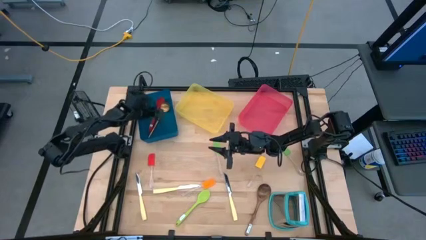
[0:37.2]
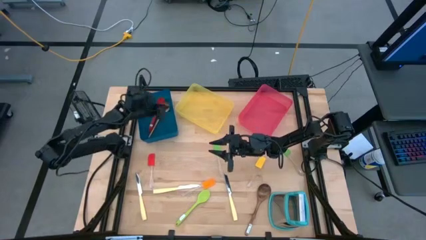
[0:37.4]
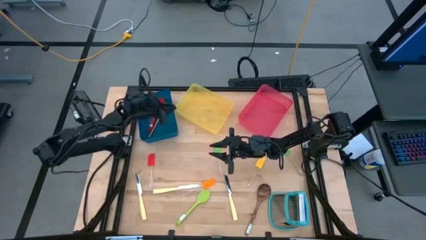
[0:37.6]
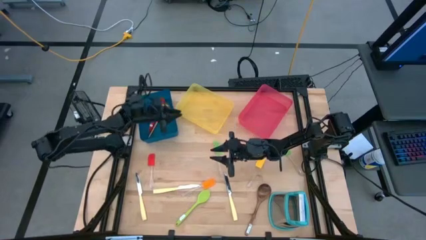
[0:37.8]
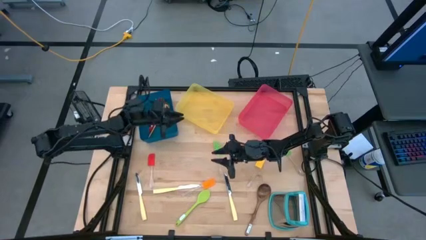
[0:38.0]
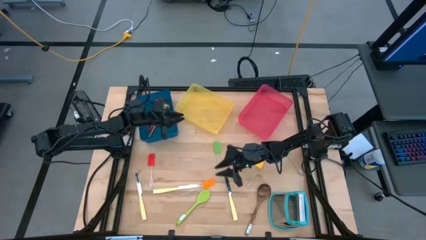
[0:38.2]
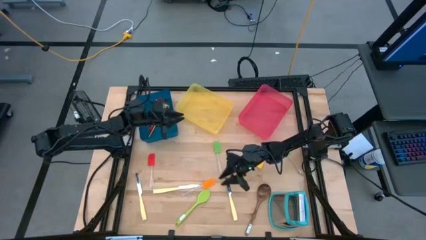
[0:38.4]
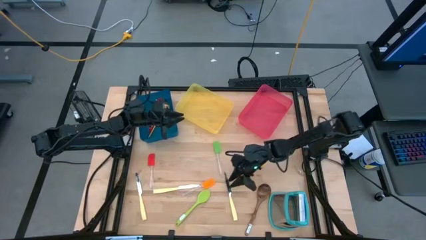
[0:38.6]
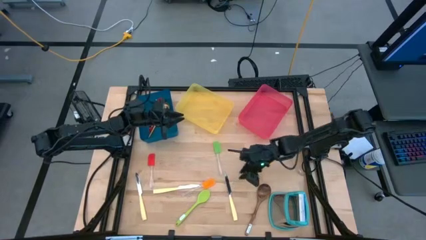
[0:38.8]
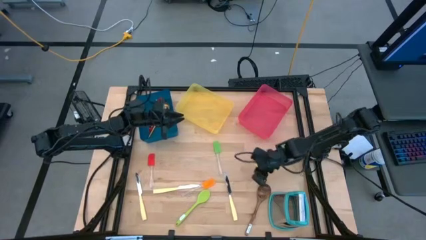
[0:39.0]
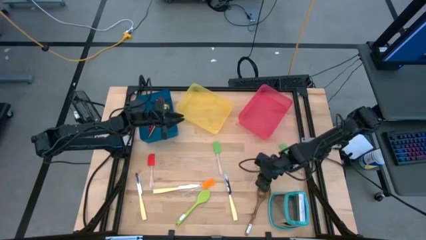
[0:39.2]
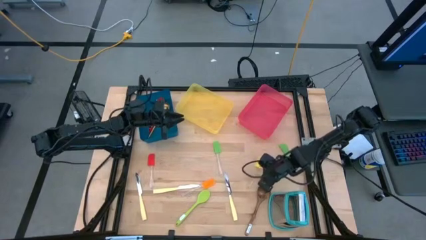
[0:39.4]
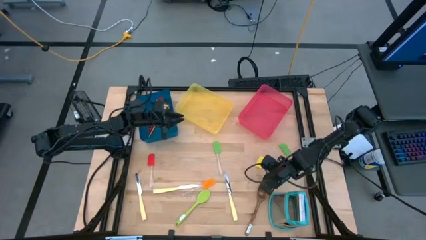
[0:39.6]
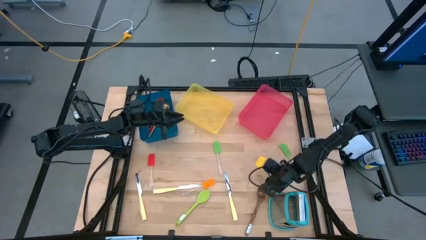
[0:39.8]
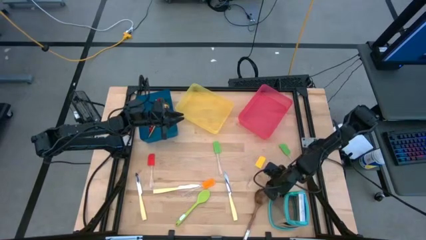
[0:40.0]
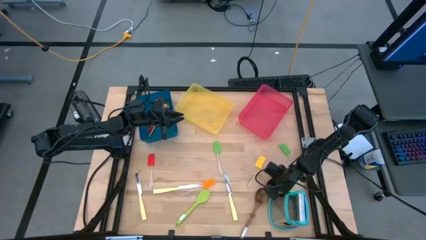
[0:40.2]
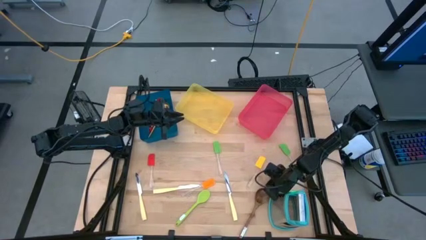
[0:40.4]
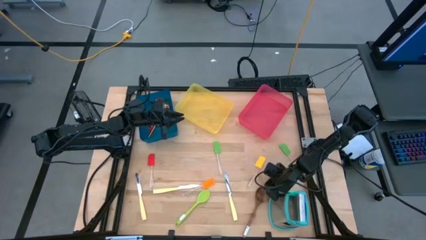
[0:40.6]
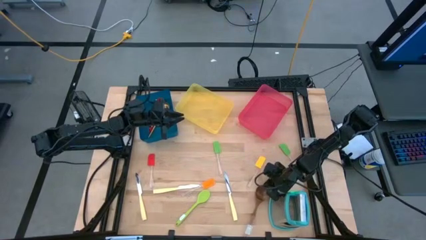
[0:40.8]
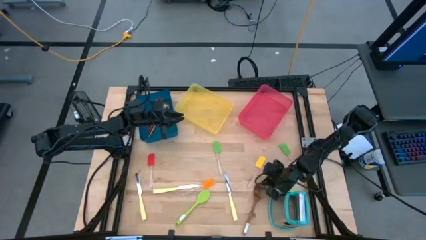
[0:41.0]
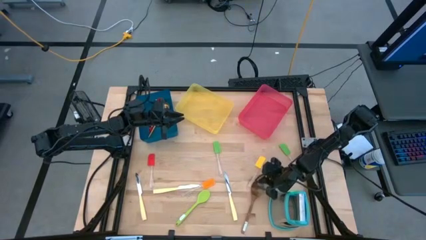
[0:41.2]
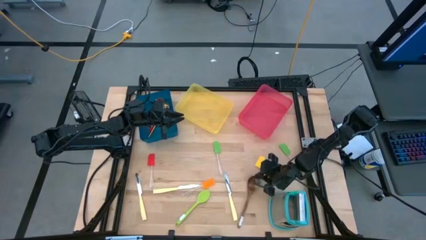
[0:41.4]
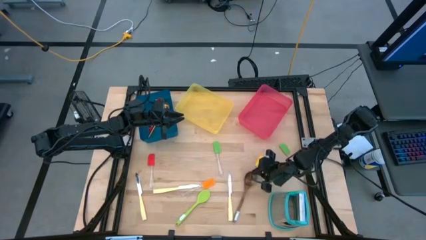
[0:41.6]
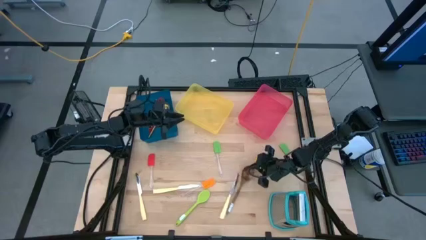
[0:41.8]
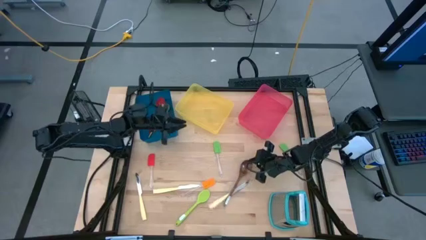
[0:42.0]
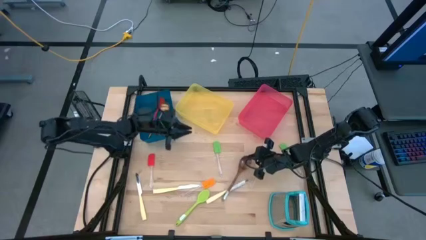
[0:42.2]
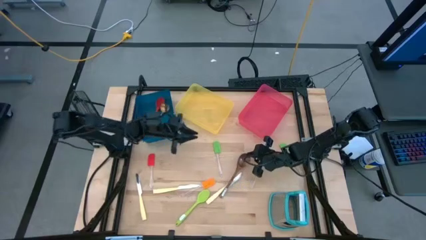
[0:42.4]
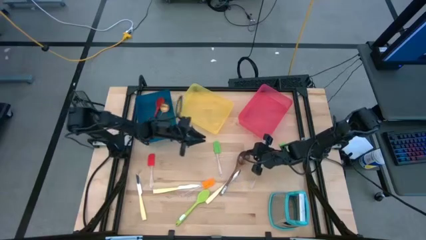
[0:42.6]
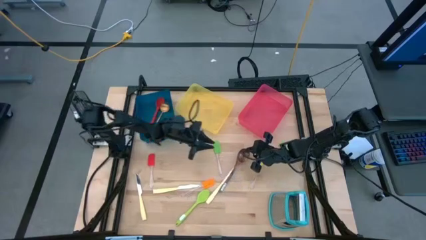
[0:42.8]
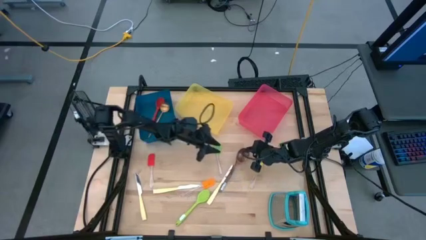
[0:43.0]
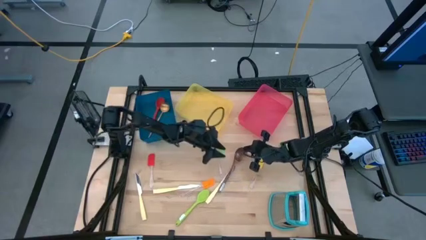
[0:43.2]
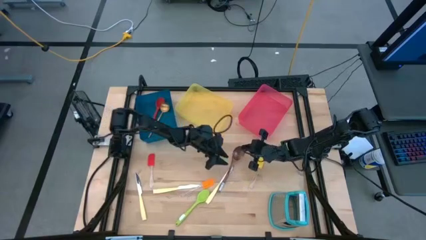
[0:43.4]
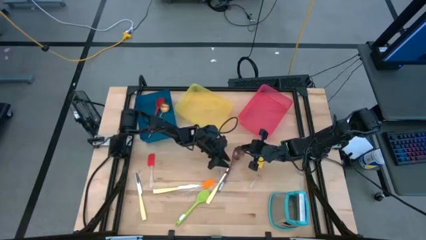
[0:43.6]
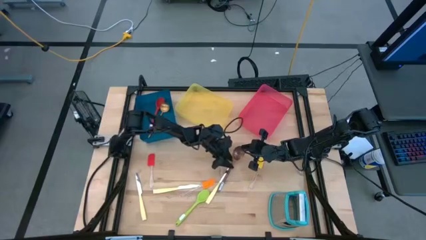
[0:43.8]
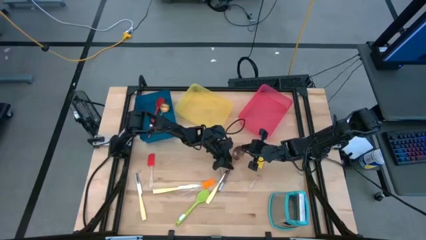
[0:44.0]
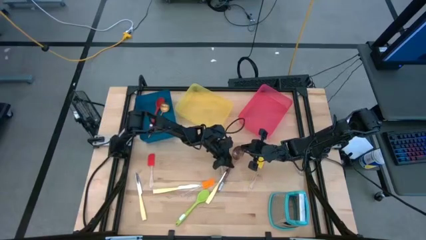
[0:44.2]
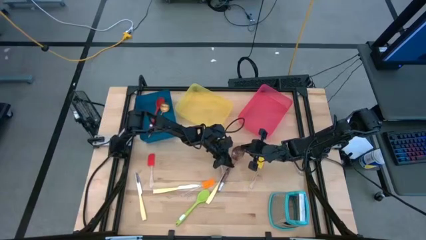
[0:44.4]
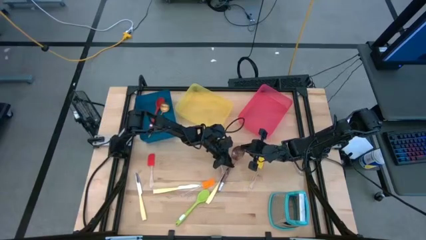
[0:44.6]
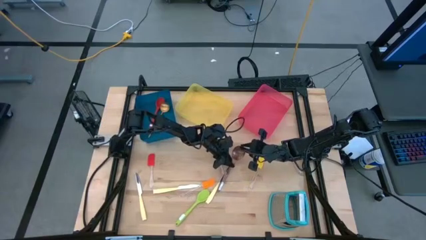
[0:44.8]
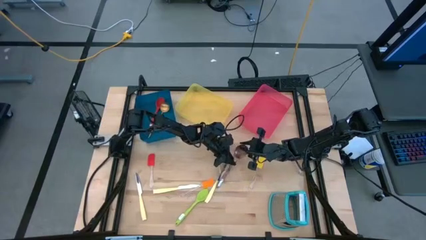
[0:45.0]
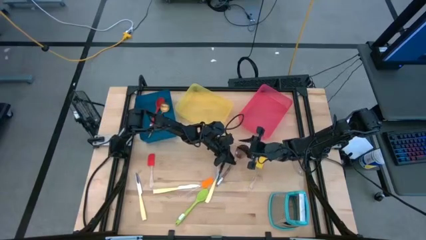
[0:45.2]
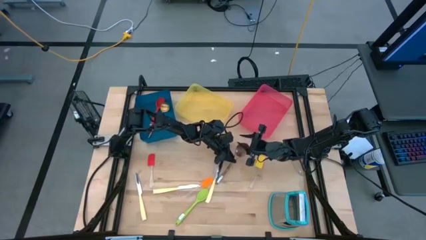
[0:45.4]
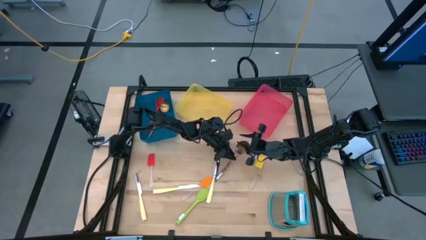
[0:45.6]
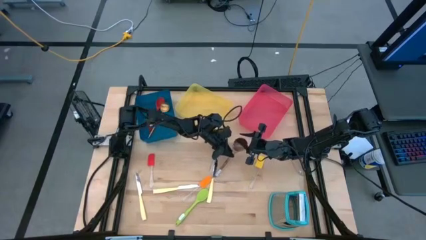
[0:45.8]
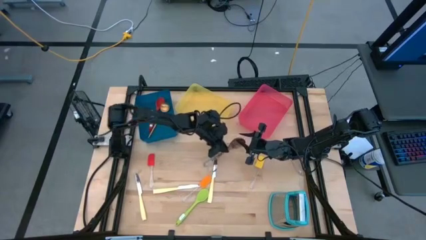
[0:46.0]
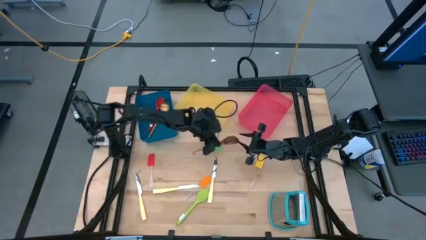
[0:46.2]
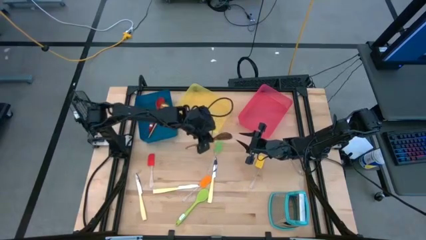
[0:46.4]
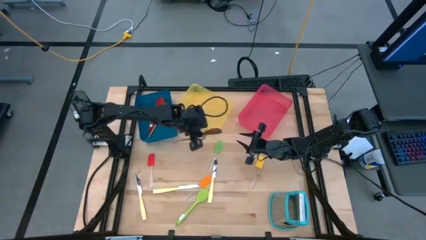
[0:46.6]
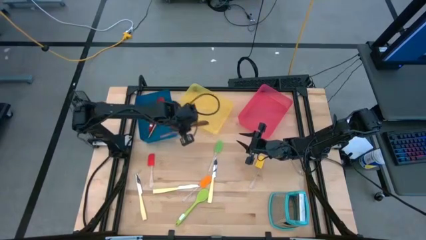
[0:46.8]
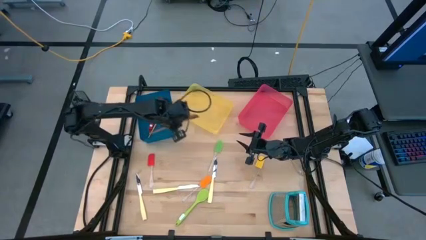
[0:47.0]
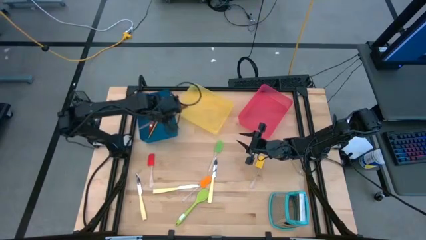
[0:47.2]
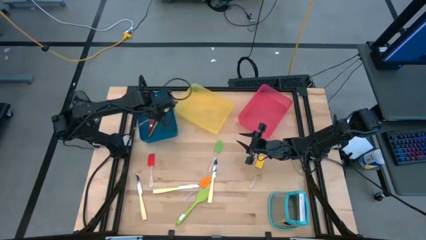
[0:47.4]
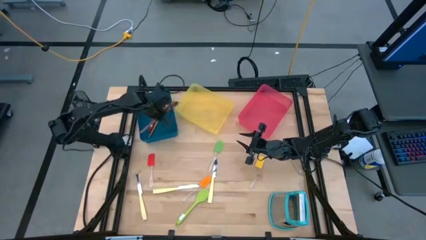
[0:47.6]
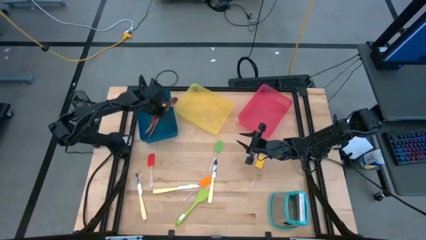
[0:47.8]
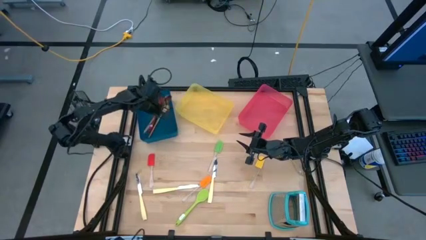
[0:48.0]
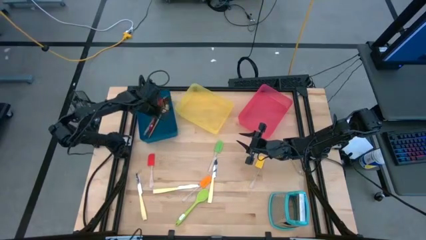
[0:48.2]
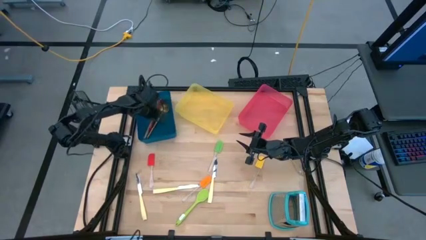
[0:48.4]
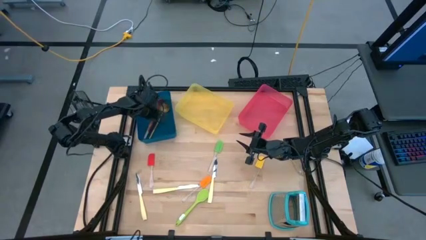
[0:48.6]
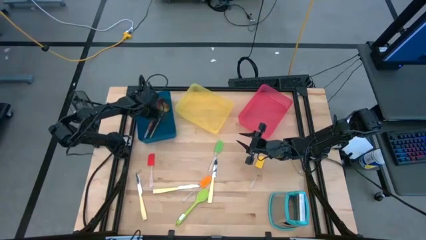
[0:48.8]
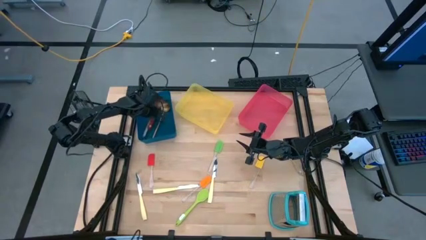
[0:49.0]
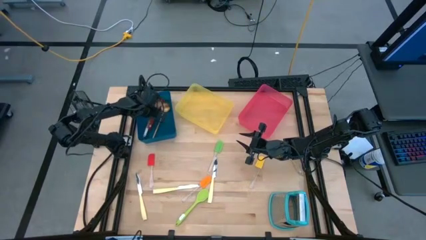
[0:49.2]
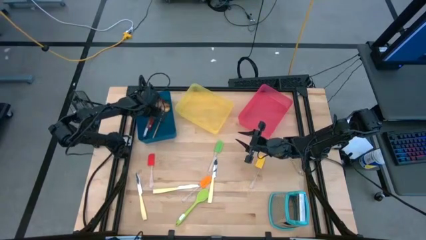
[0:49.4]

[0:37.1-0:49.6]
Task: Pick & Place Kitchen Items
Put the wooden serving spoon into the blue bin
